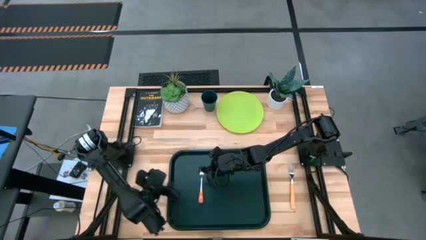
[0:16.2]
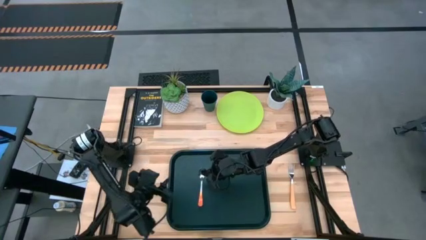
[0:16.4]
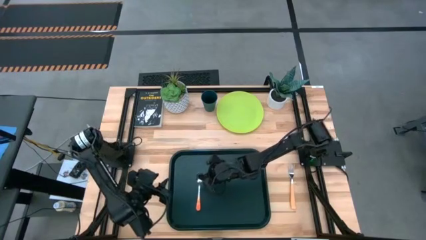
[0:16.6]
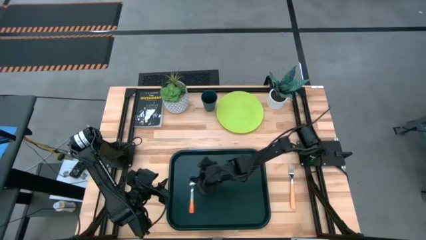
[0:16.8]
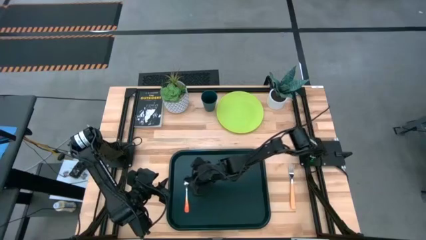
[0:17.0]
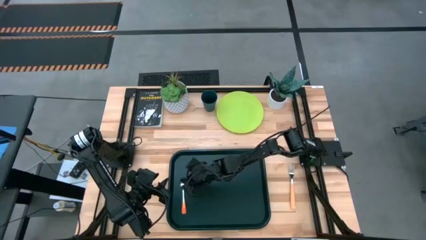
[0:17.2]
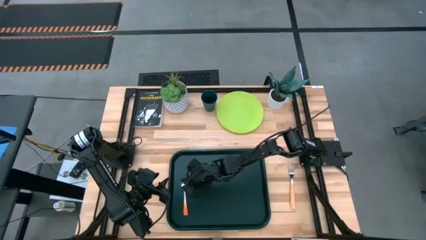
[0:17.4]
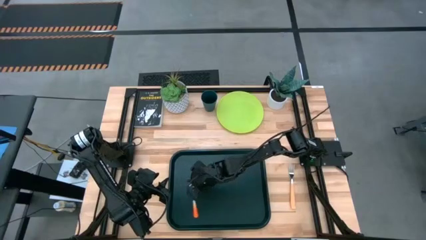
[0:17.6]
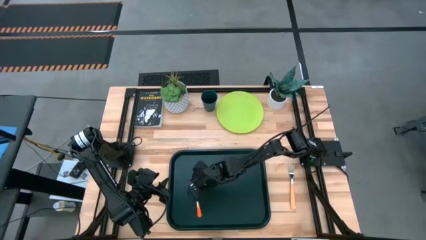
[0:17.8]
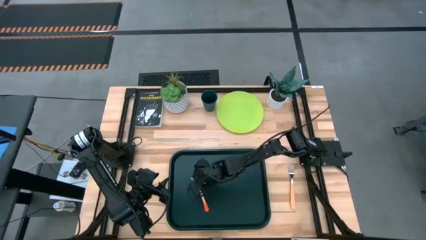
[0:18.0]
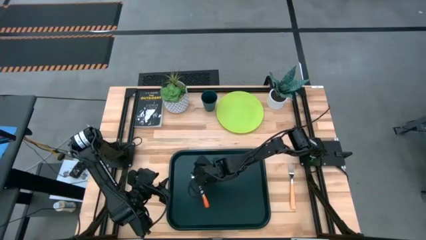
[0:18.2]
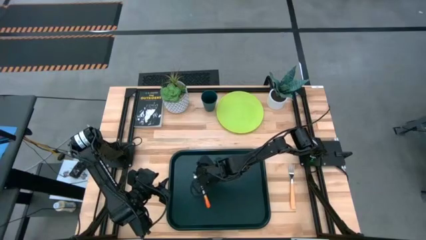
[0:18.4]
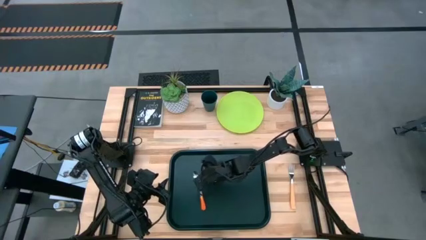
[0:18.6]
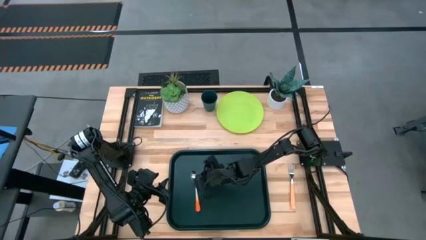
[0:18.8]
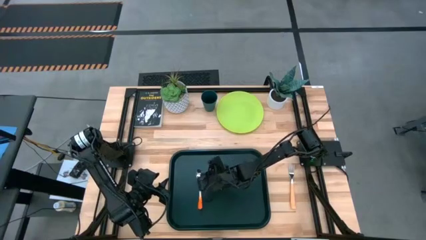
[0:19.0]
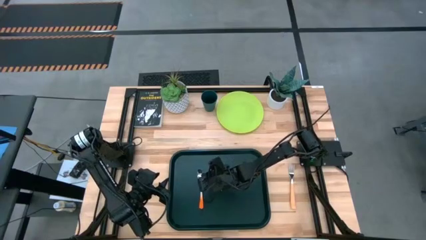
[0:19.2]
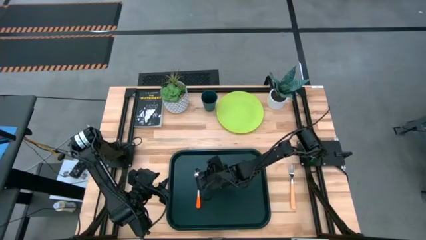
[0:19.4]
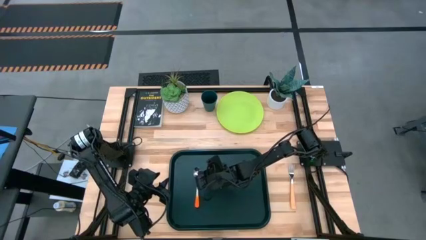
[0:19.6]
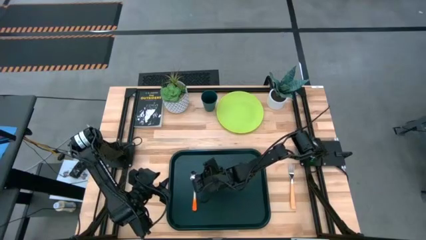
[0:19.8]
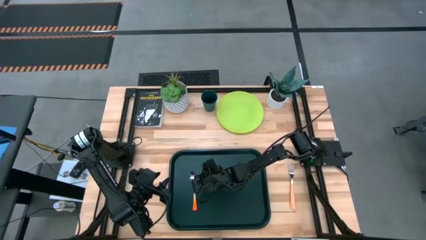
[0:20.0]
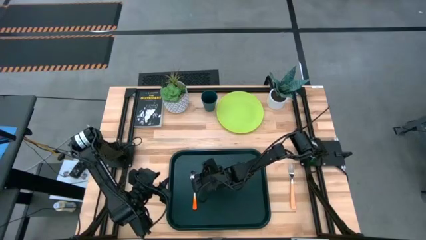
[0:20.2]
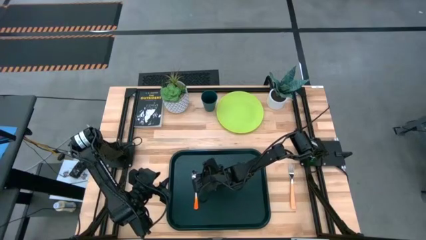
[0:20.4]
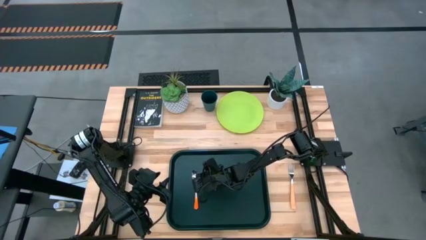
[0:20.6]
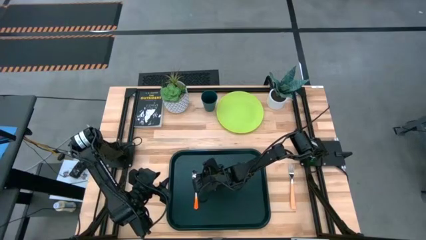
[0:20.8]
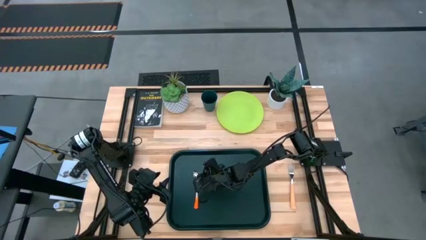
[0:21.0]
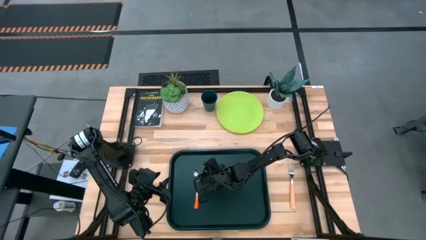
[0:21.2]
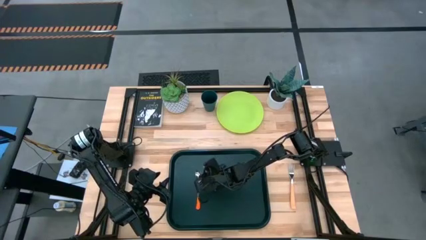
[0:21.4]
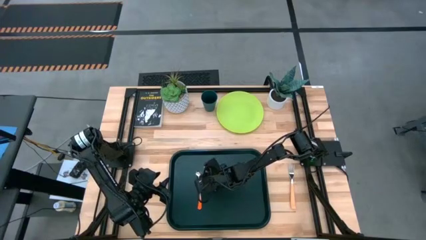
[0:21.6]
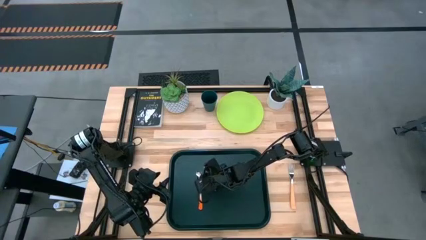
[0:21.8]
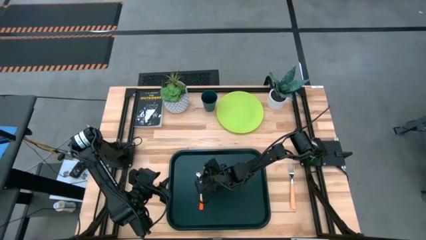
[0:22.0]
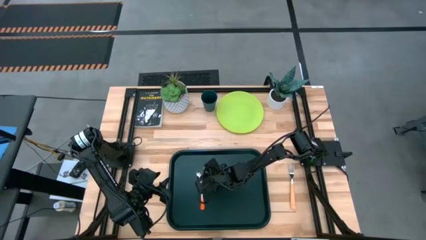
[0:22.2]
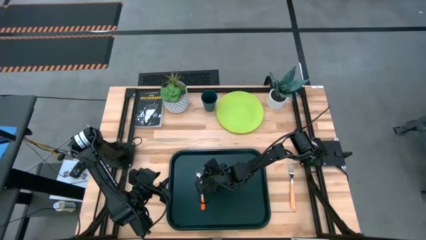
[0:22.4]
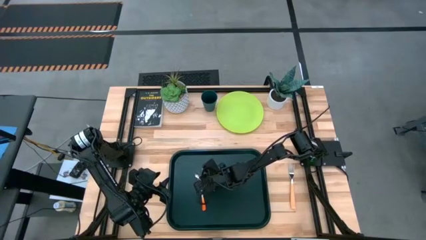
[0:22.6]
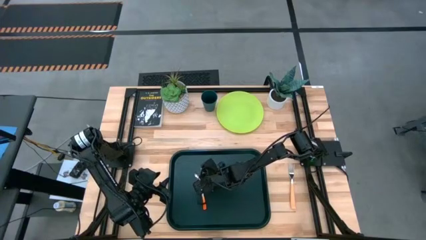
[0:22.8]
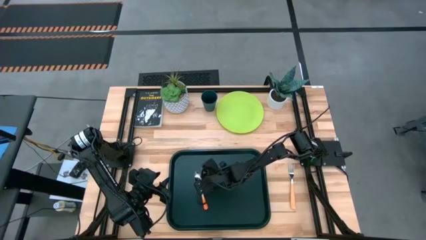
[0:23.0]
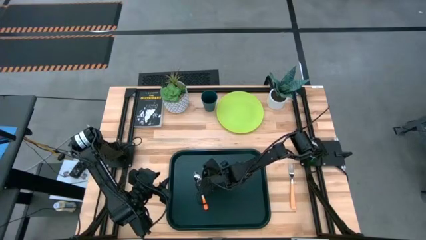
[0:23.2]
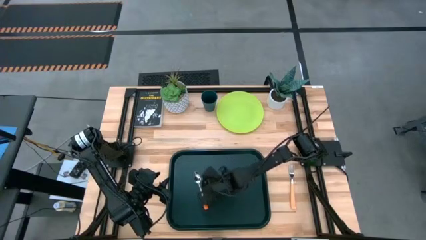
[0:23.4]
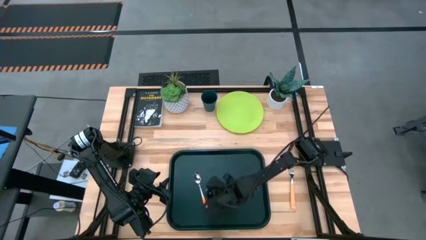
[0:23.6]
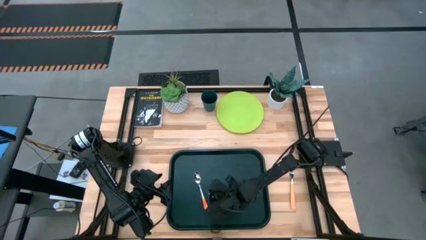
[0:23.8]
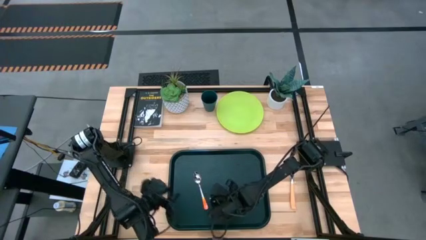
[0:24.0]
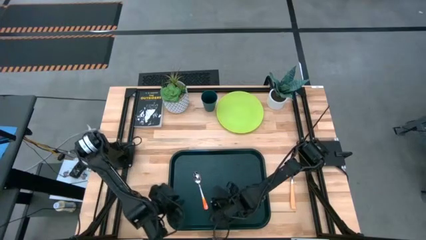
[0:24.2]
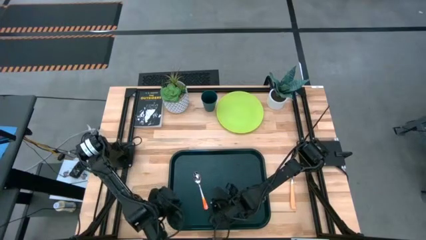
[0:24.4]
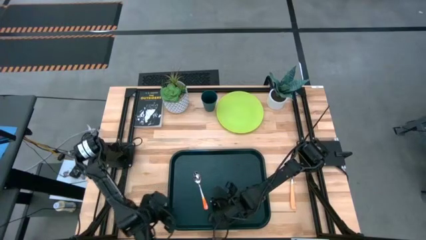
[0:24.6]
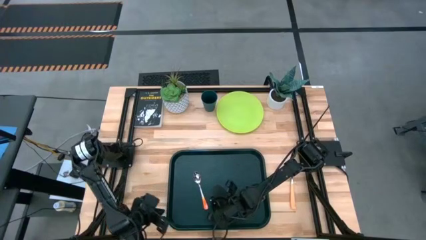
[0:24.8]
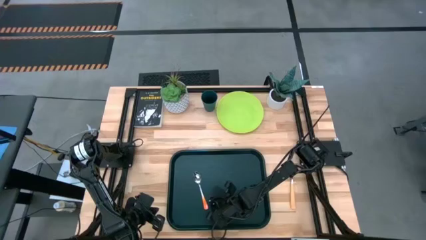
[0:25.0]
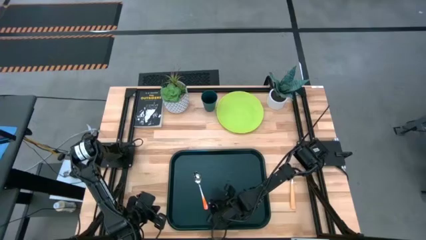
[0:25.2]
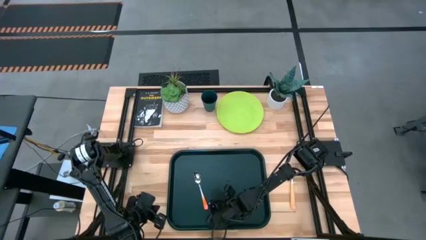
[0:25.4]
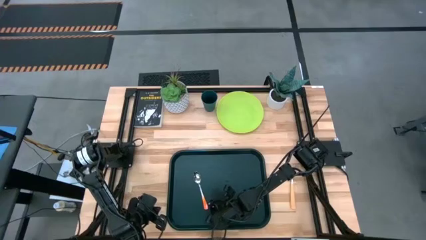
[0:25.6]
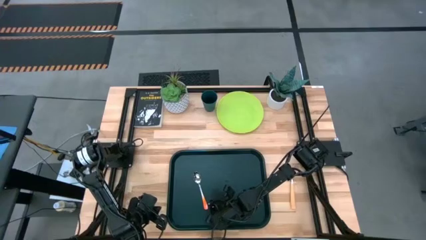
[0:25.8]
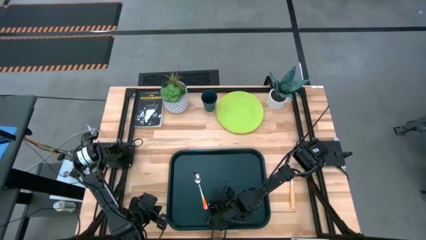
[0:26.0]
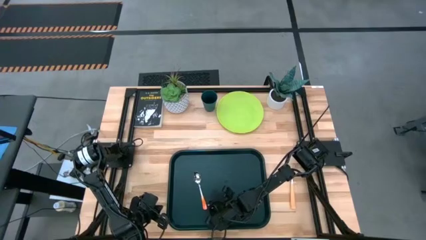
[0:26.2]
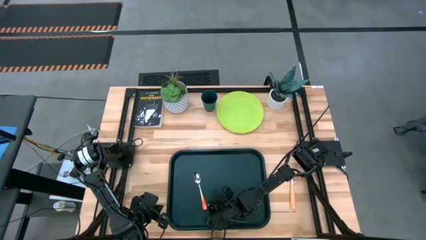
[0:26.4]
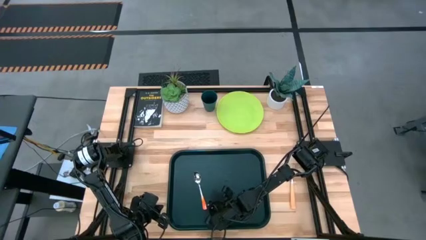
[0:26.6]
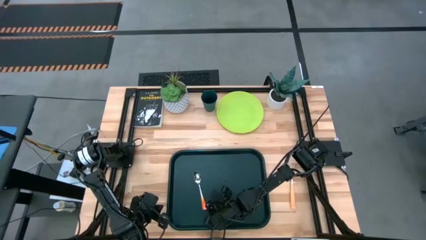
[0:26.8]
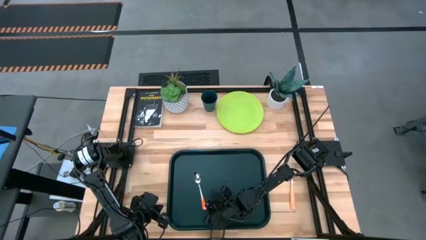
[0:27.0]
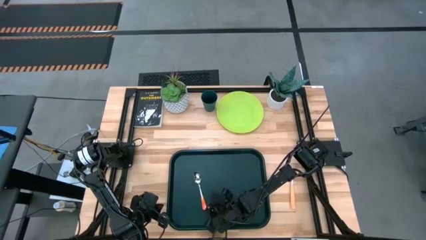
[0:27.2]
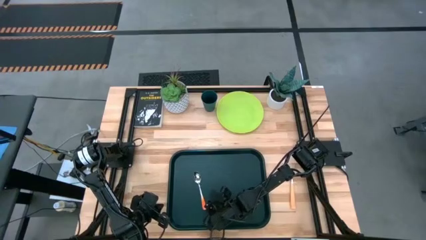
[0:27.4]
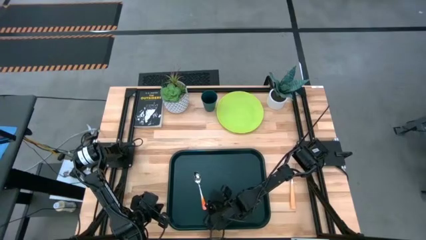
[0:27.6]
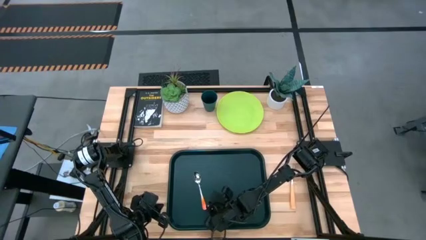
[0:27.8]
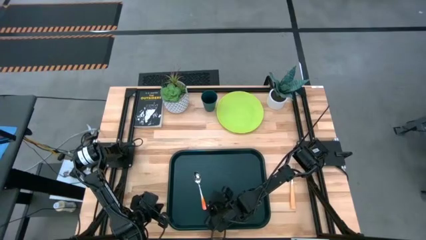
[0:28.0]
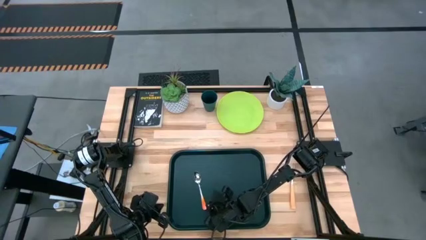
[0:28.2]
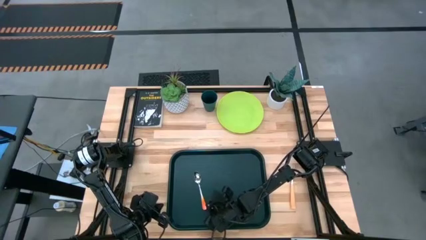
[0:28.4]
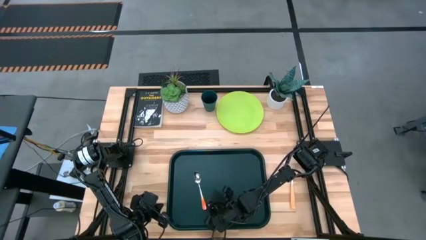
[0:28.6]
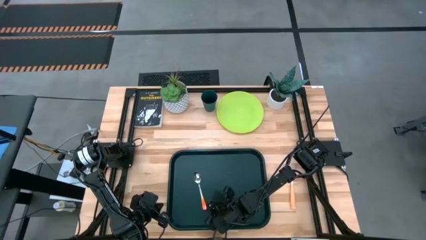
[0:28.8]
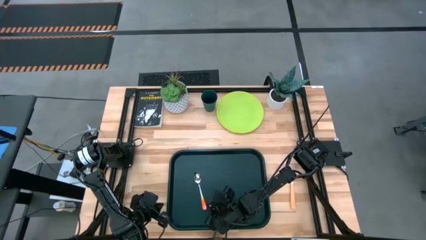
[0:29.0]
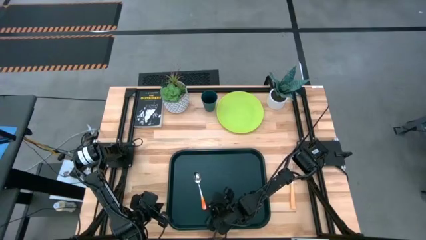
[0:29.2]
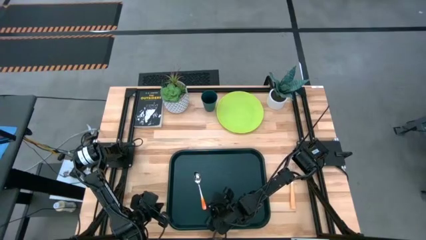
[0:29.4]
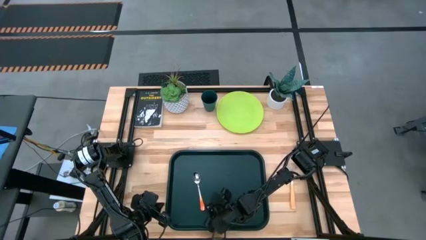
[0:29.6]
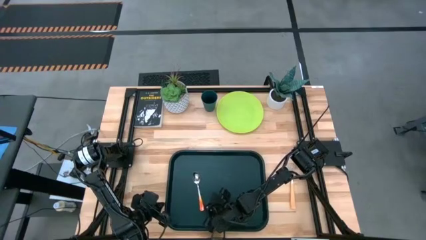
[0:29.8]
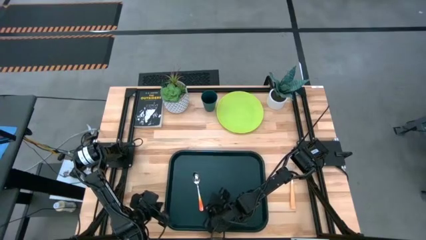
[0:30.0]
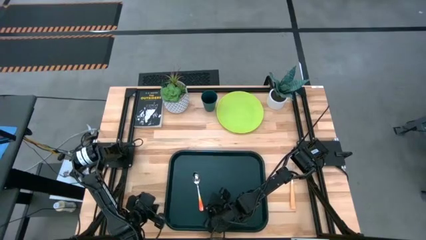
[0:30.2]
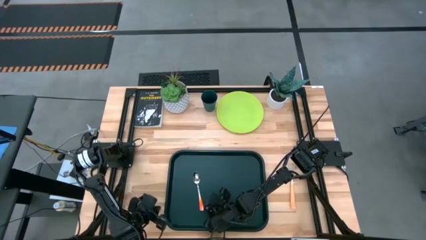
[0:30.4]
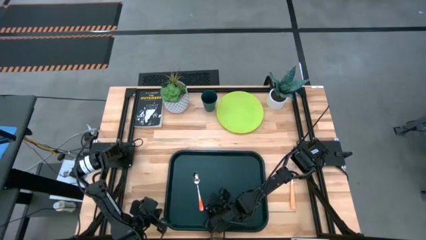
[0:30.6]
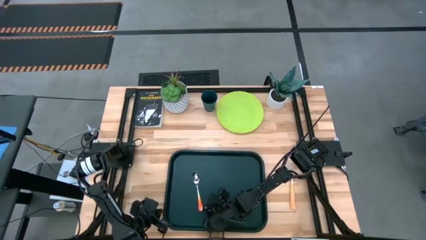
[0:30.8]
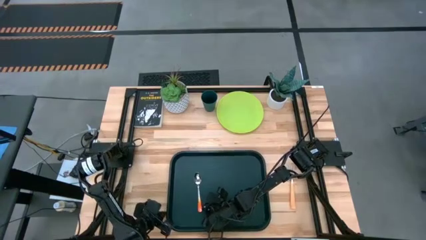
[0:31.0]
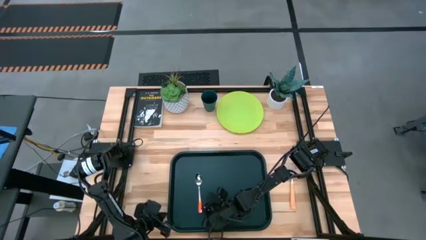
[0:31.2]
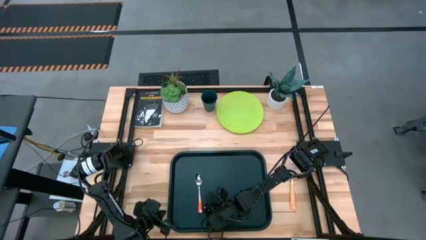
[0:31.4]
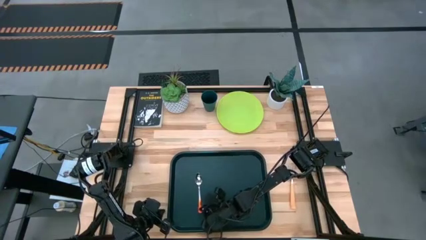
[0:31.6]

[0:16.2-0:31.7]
Task: Pick and place plate/cup/fork/spoon on tray
Put the orange spoon on the left side of the black serving tray
